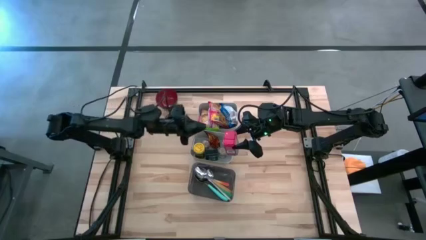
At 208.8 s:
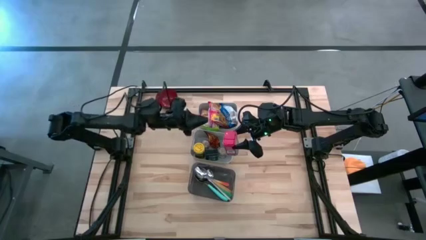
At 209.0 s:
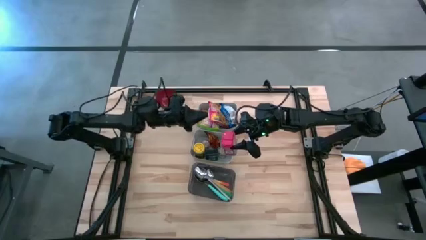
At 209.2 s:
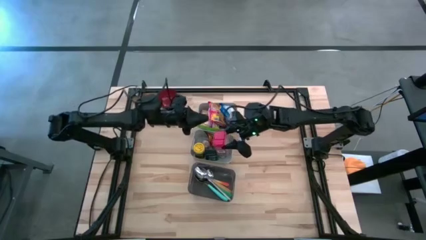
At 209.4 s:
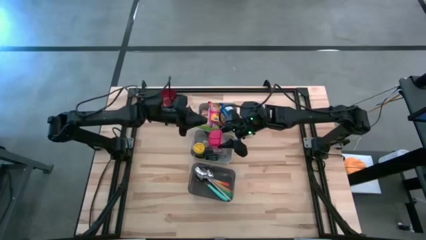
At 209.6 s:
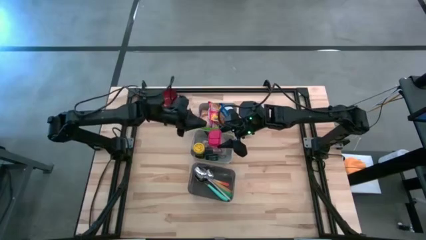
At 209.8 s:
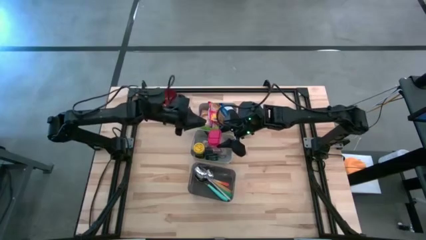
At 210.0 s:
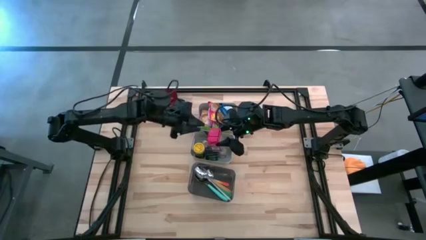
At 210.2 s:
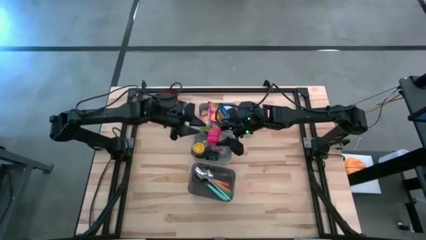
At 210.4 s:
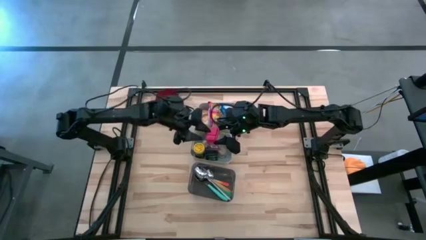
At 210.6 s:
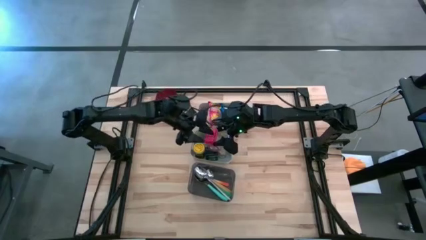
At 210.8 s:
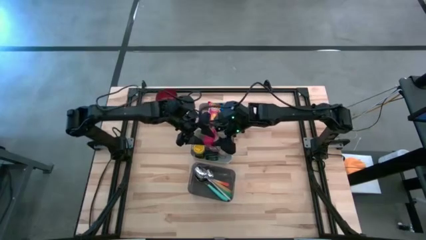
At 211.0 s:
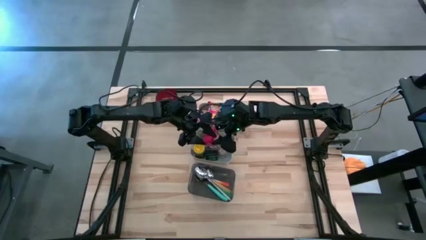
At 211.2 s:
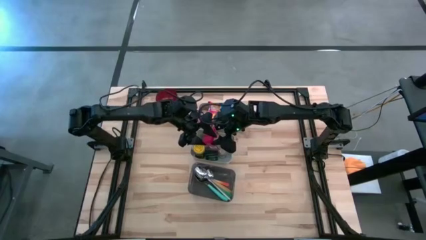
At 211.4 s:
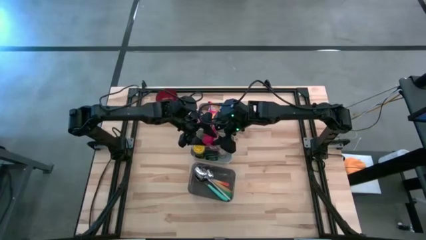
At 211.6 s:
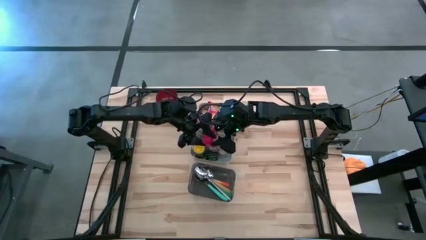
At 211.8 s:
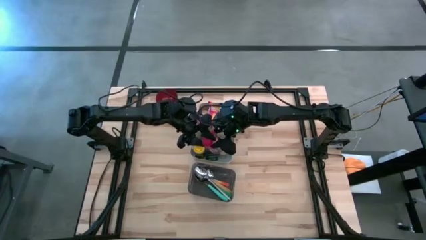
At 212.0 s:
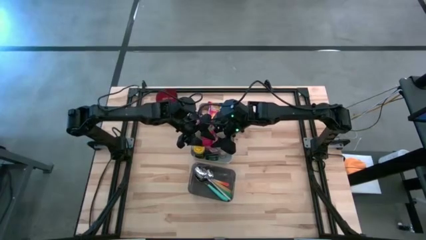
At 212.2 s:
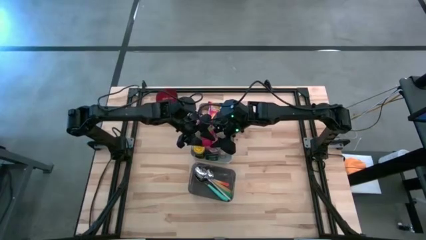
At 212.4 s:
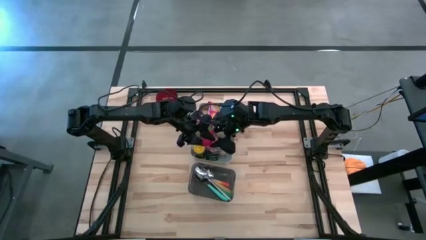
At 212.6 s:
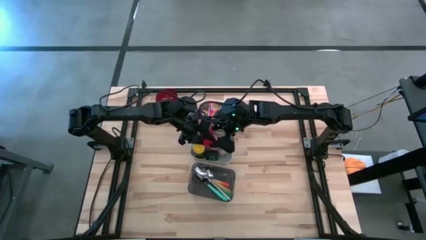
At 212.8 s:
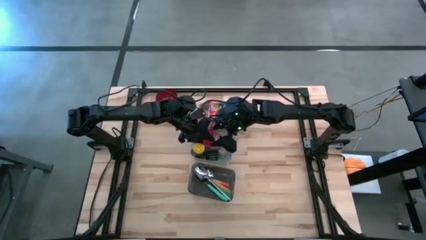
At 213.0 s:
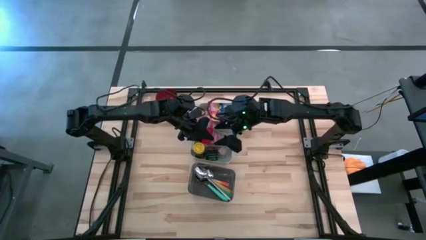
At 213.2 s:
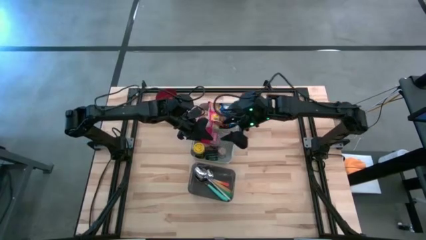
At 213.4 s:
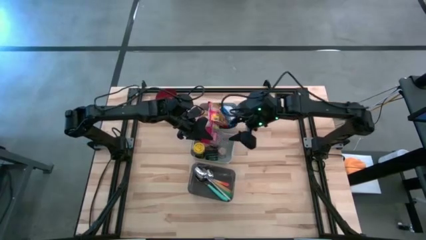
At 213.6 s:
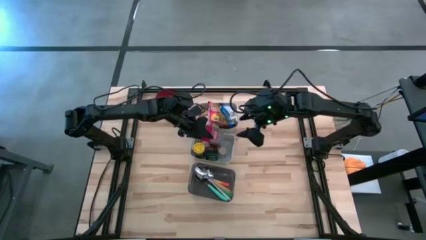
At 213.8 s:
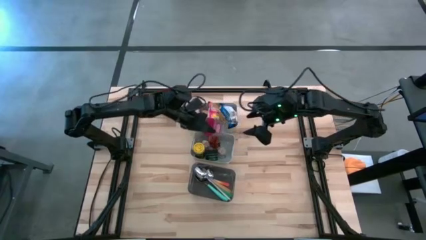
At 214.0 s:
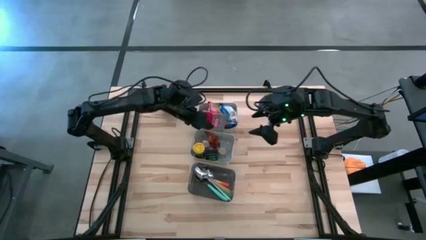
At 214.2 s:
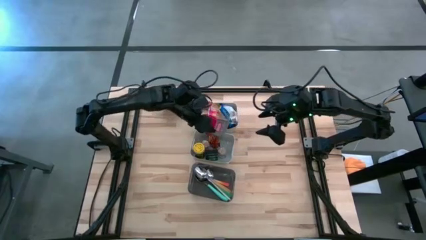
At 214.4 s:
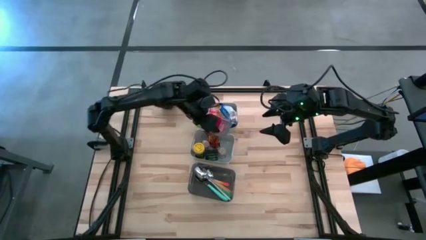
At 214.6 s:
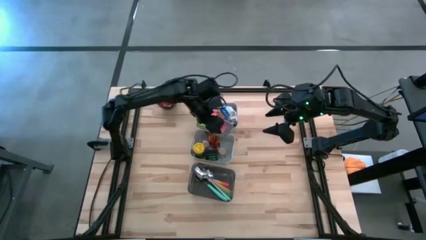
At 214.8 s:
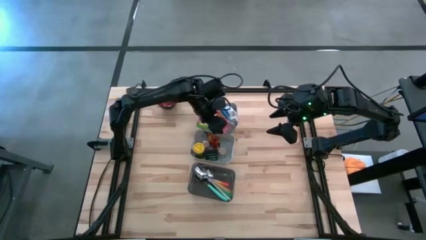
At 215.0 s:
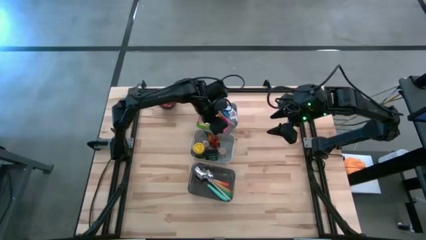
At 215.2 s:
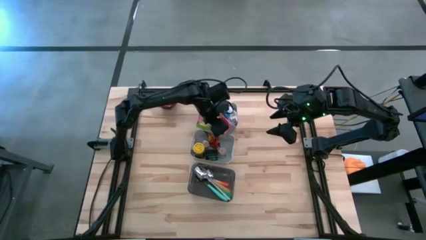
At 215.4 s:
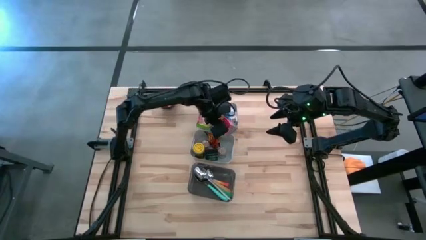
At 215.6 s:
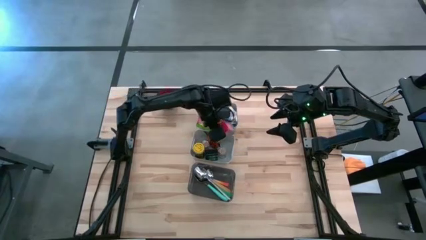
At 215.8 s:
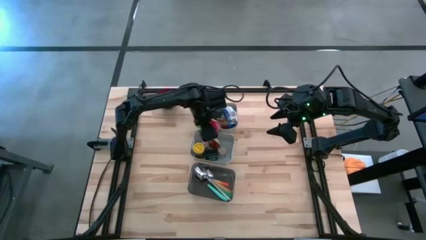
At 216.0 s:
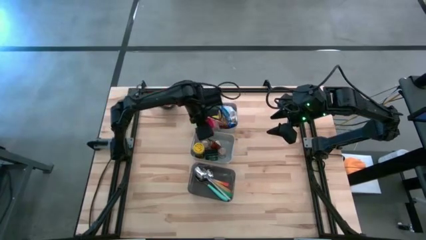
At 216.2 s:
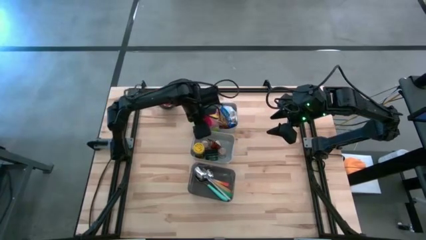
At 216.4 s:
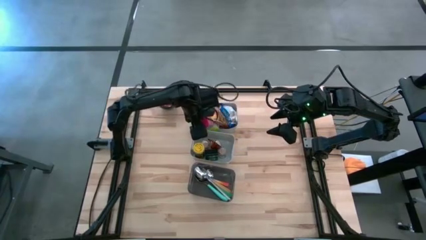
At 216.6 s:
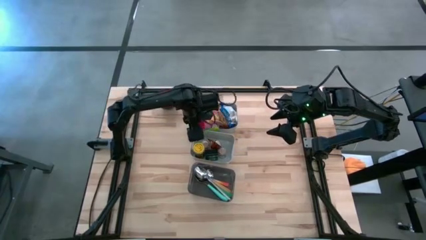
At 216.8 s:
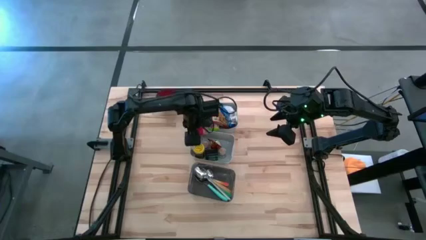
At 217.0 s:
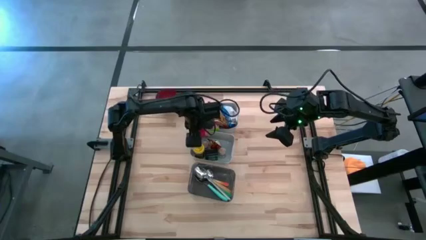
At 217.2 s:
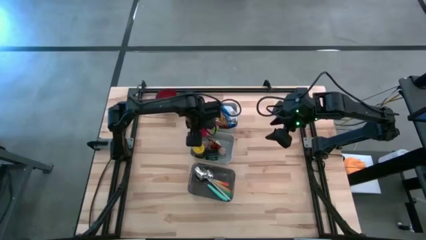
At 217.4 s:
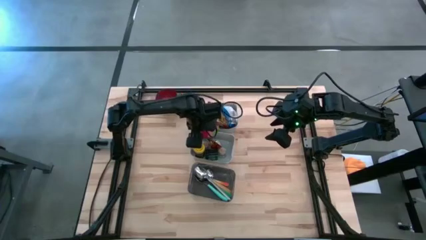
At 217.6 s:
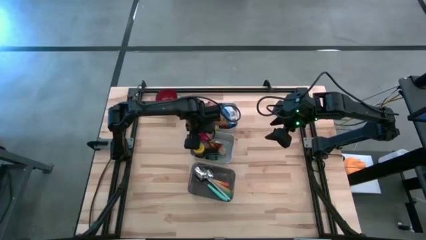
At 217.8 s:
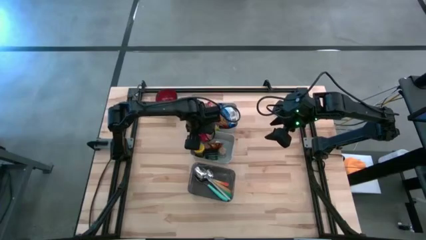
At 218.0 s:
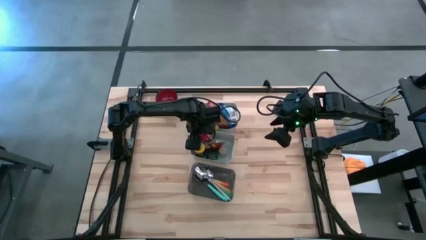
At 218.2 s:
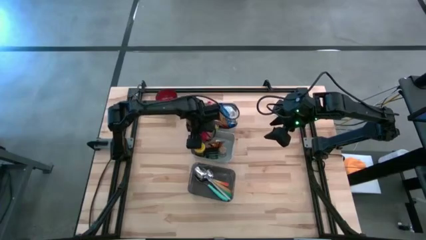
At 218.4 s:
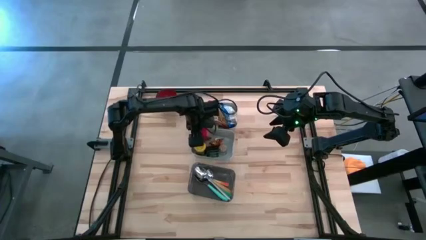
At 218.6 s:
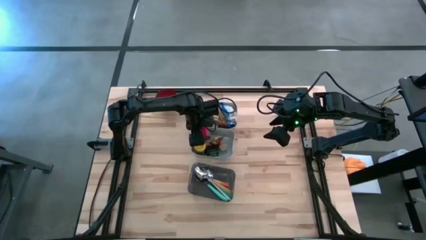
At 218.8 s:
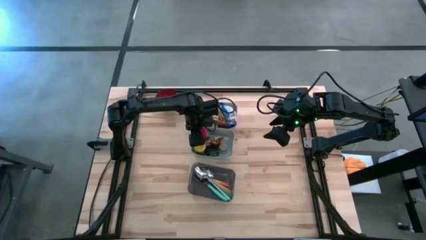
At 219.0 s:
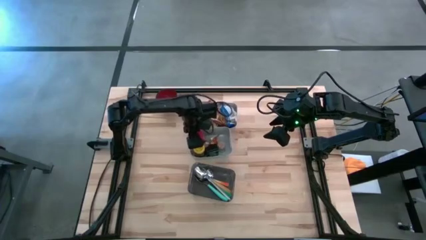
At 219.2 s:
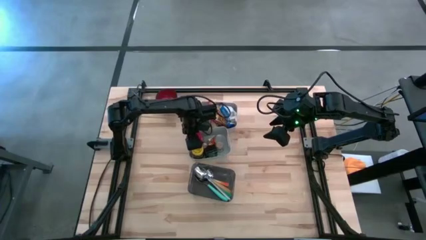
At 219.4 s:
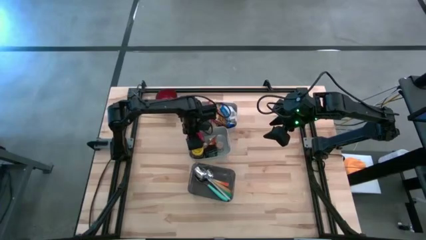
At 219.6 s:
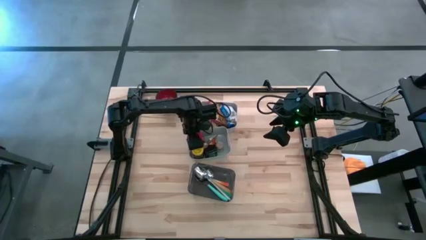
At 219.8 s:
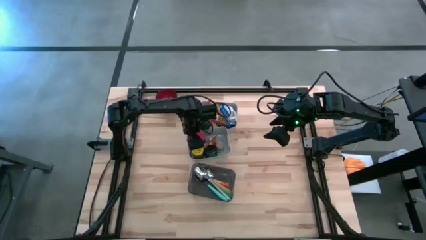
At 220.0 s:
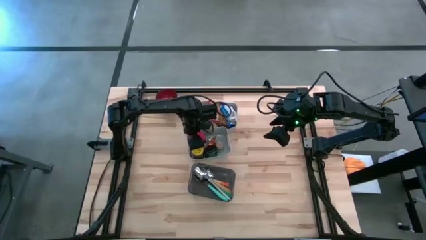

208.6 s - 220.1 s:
Put the red seasoning can into the bottom gray bin

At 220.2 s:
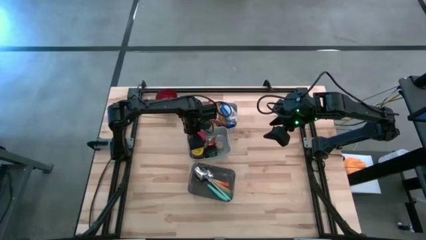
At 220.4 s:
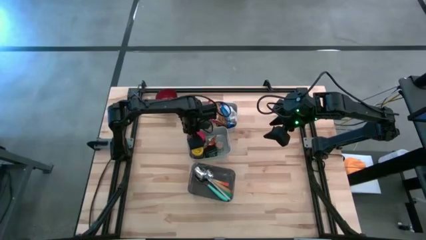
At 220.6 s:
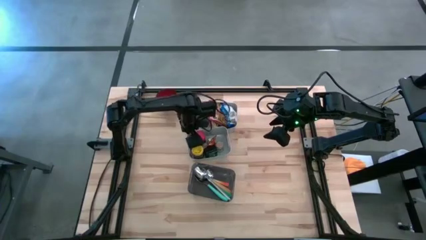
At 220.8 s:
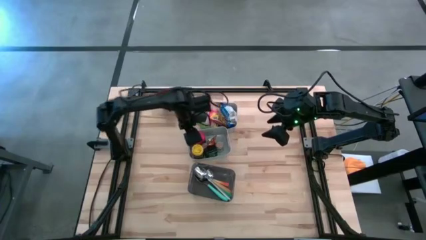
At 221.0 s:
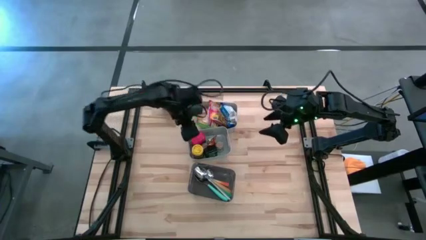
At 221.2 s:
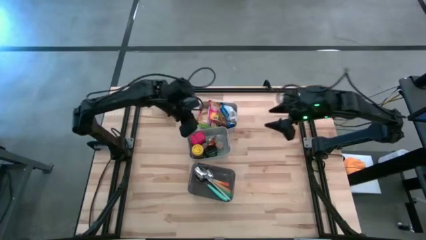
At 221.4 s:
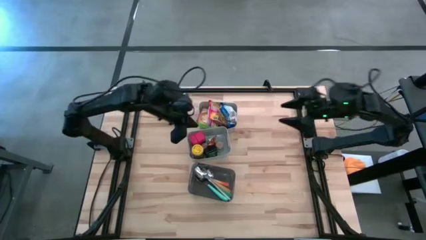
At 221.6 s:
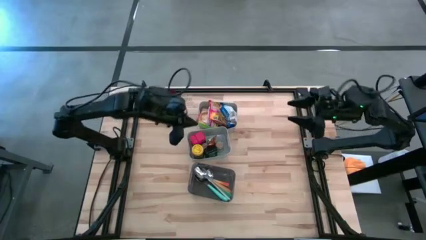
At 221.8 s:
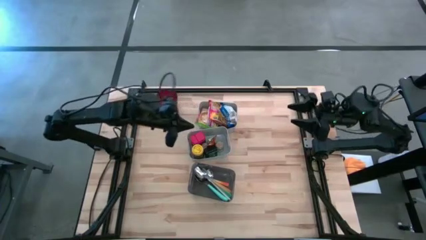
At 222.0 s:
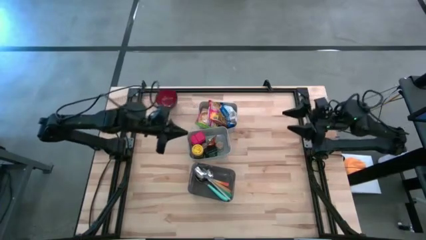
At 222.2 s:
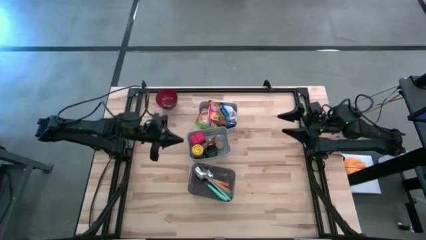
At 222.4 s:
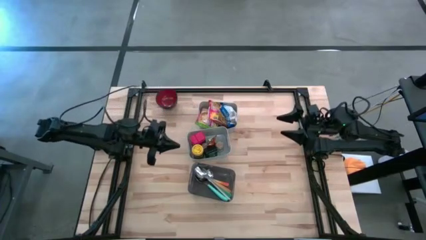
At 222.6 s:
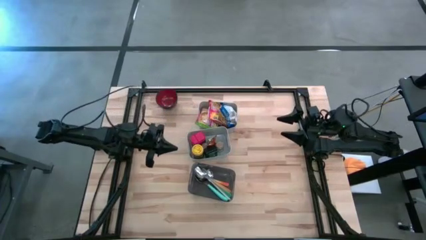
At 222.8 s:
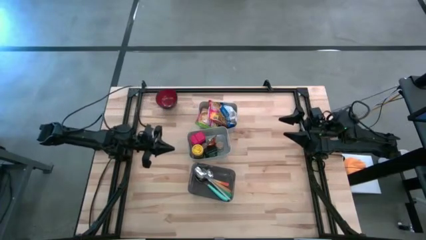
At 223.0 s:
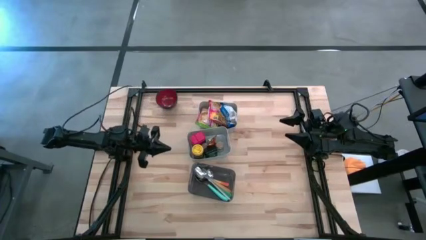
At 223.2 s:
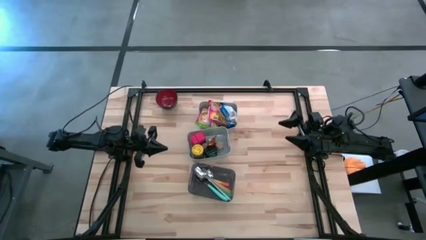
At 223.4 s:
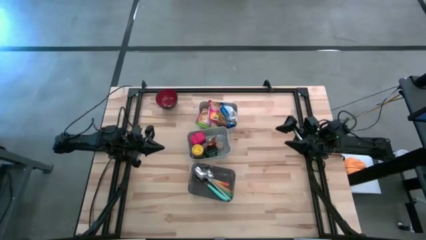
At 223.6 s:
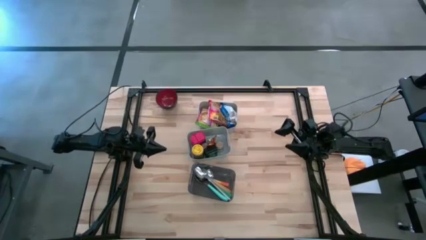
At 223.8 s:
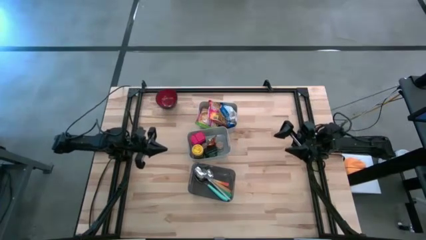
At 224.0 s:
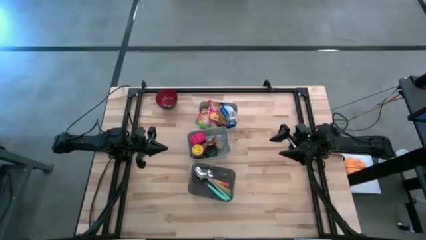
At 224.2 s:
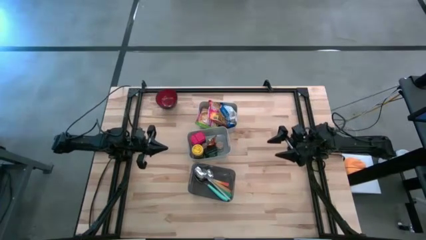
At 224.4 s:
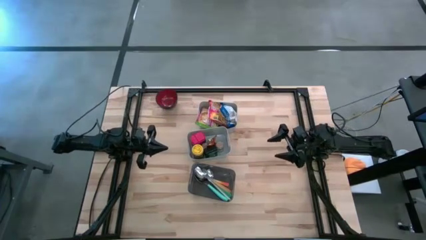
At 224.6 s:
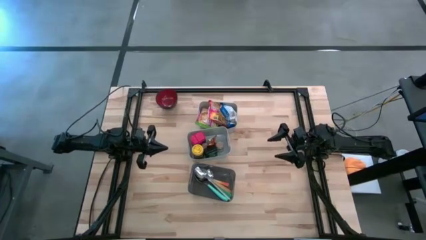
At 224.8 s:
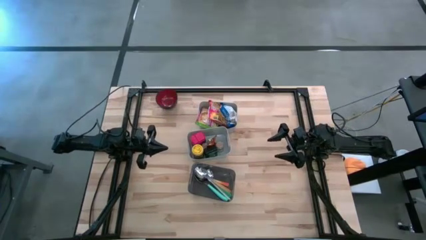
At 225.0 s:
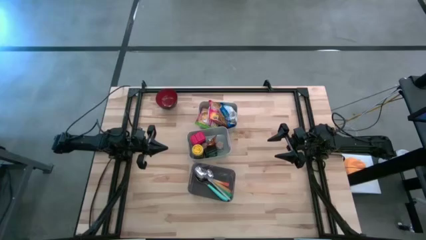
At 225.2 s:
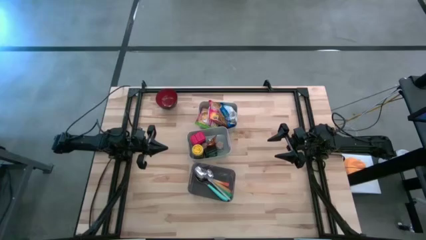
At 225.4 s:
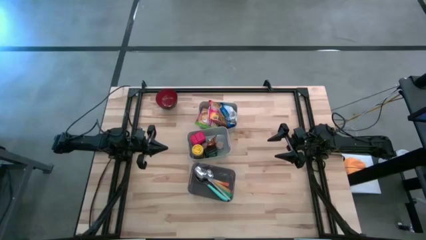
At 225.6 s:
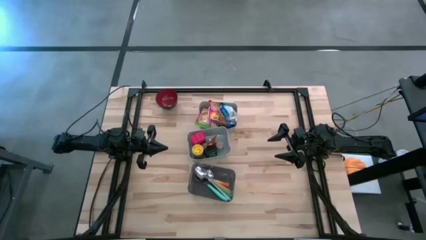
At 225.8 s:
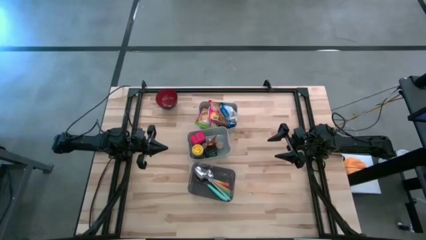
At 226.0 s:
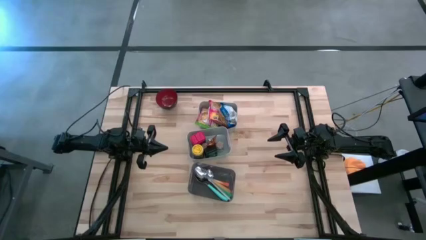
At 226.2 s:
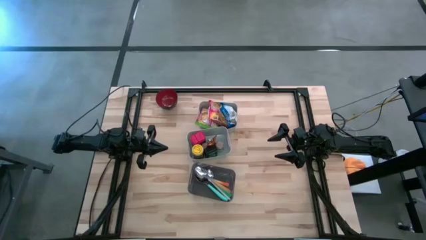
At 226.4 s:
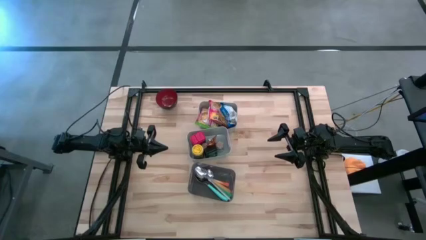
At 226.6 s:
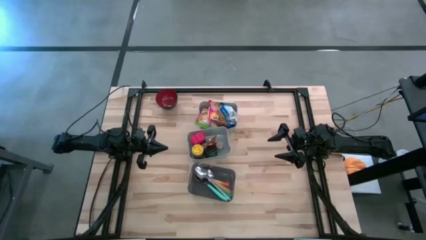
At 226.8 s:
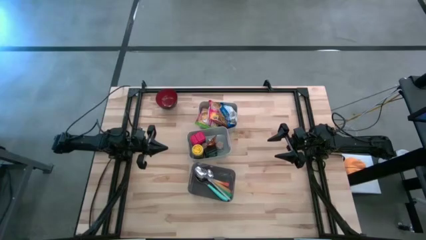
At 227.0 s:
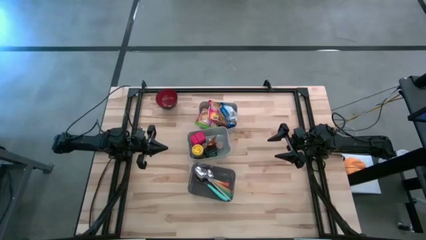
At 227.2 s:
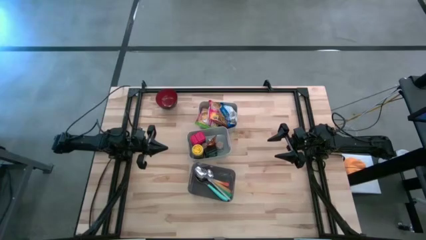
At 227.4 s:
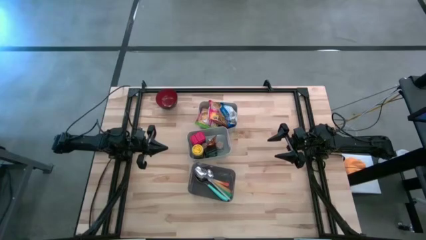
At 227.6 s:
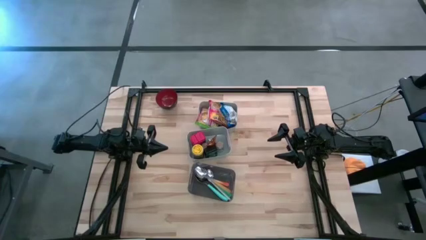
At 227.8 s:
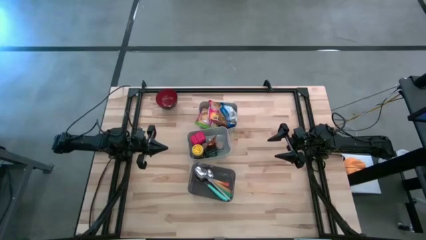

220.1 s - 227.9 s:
Return to Home Position
